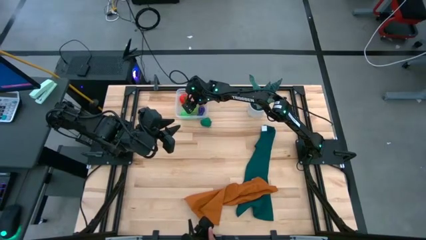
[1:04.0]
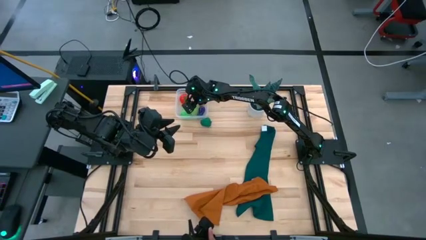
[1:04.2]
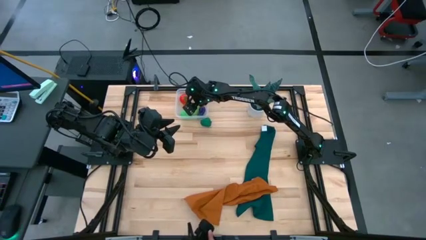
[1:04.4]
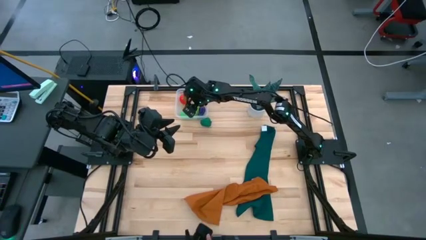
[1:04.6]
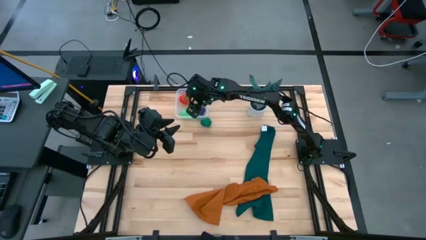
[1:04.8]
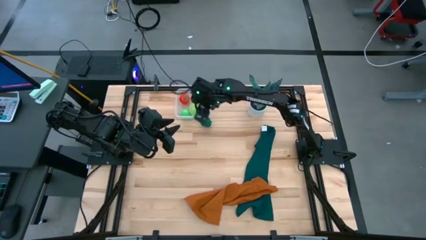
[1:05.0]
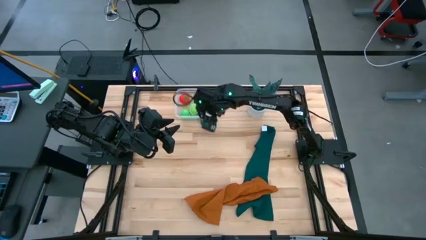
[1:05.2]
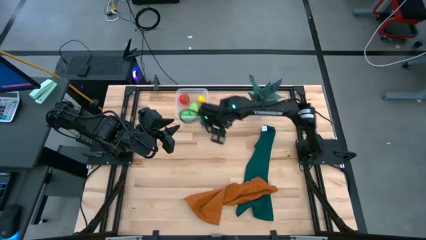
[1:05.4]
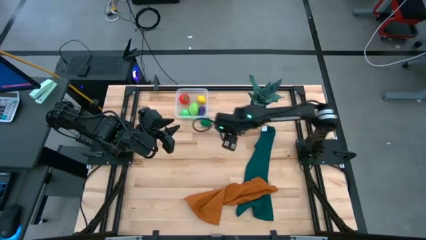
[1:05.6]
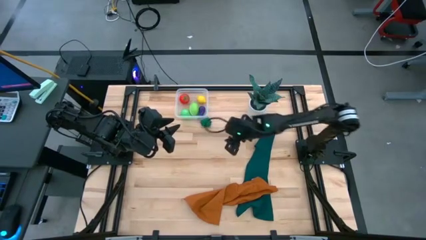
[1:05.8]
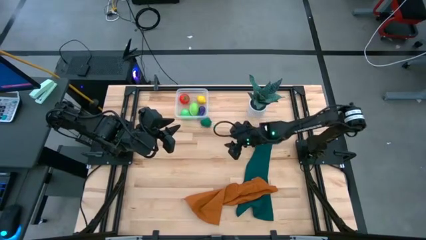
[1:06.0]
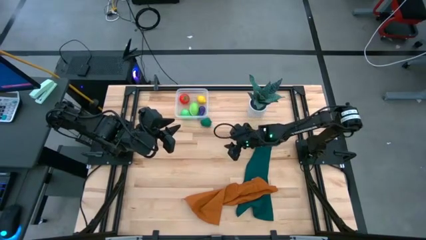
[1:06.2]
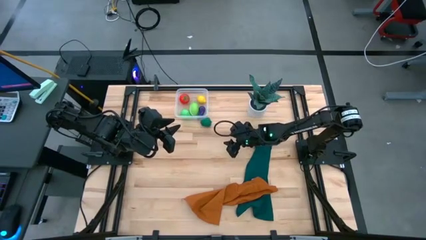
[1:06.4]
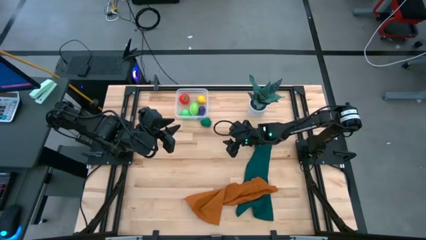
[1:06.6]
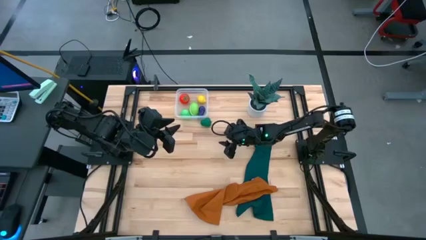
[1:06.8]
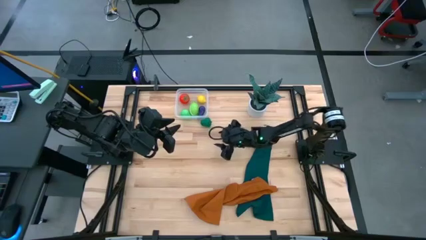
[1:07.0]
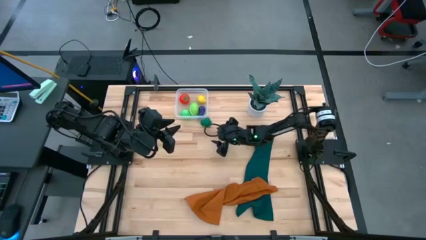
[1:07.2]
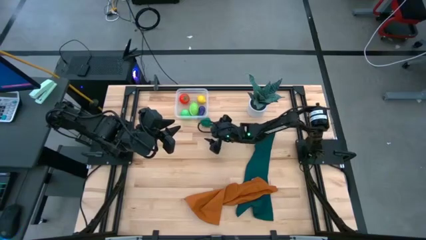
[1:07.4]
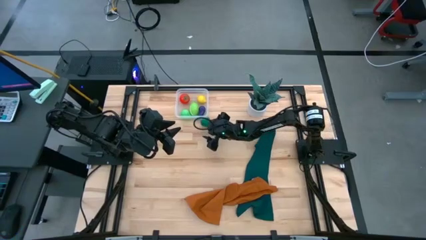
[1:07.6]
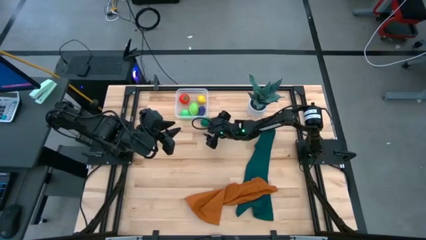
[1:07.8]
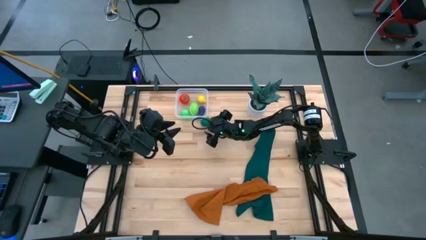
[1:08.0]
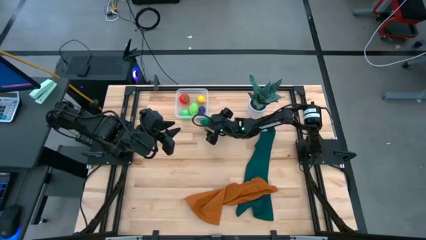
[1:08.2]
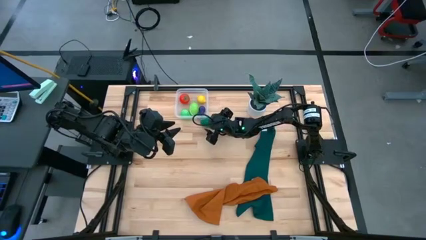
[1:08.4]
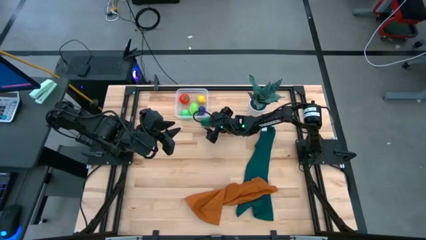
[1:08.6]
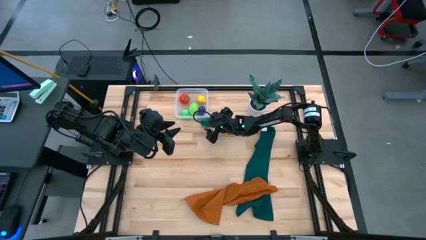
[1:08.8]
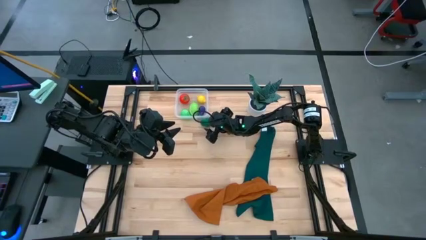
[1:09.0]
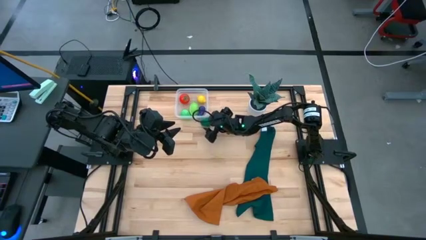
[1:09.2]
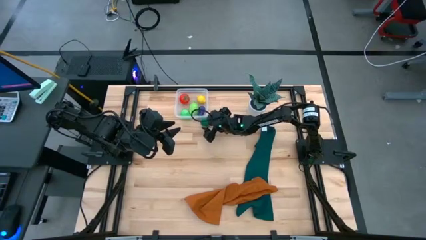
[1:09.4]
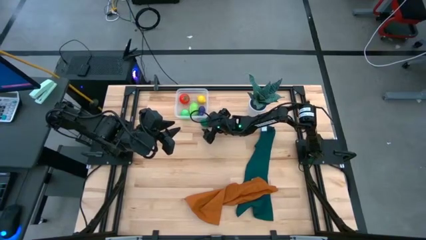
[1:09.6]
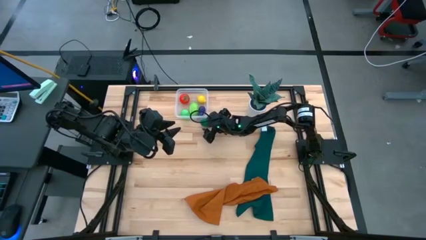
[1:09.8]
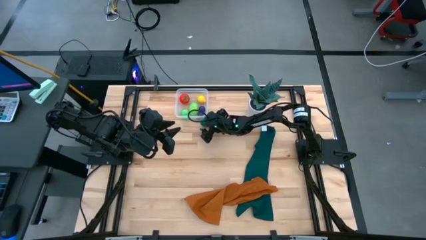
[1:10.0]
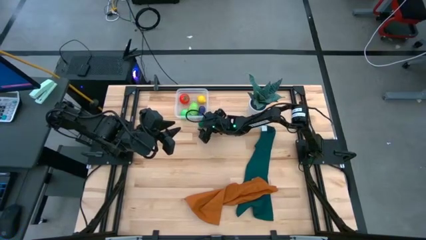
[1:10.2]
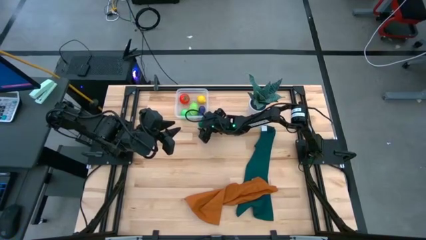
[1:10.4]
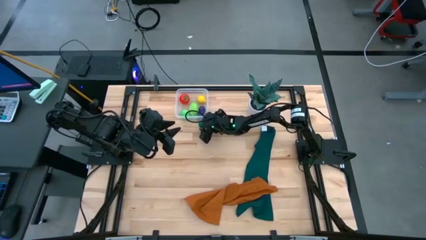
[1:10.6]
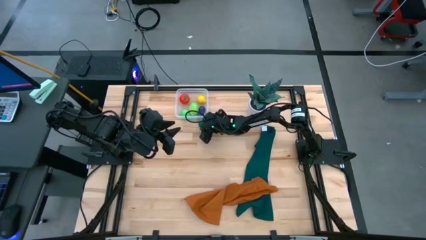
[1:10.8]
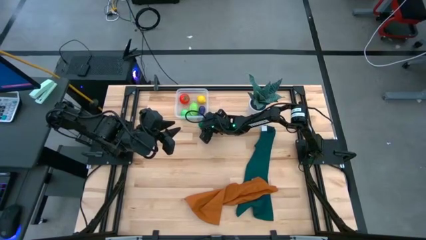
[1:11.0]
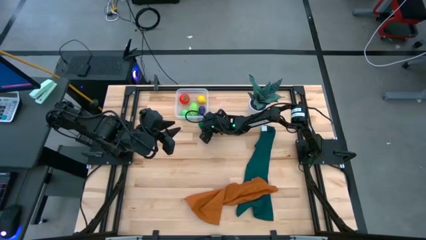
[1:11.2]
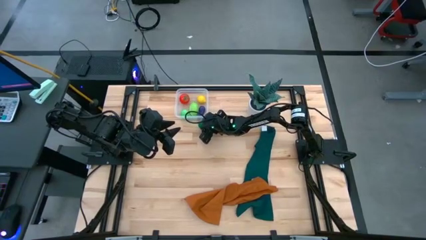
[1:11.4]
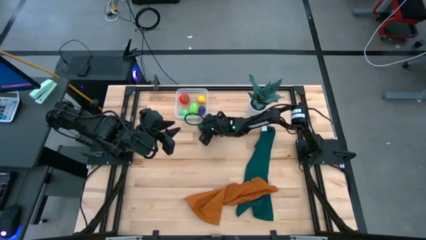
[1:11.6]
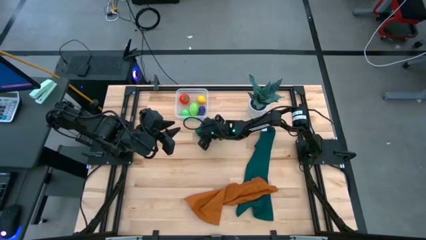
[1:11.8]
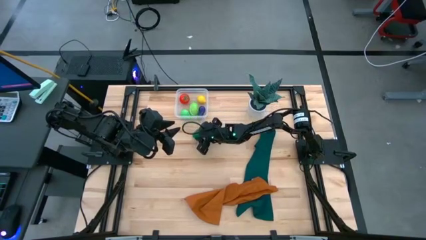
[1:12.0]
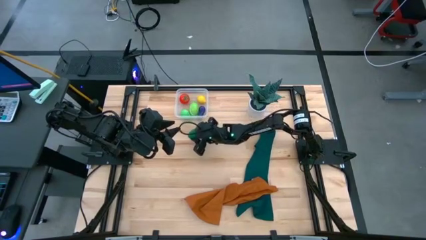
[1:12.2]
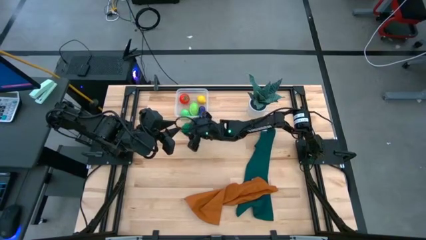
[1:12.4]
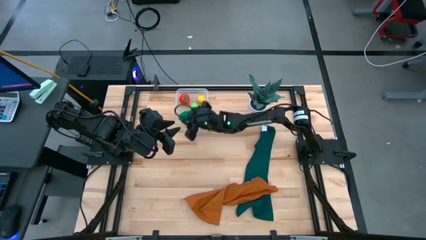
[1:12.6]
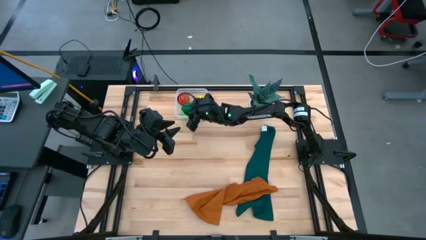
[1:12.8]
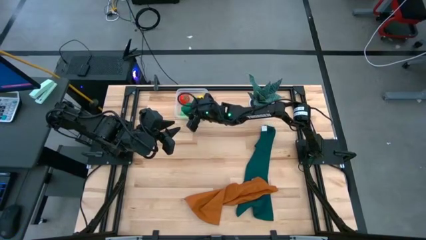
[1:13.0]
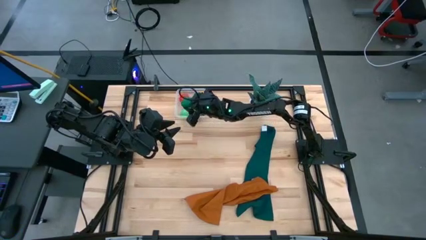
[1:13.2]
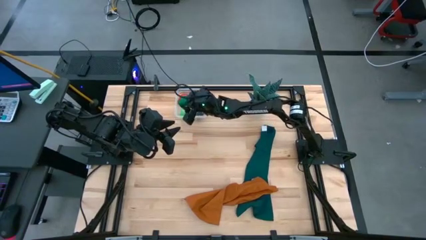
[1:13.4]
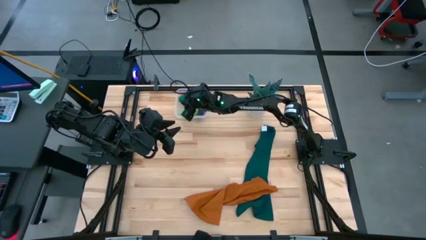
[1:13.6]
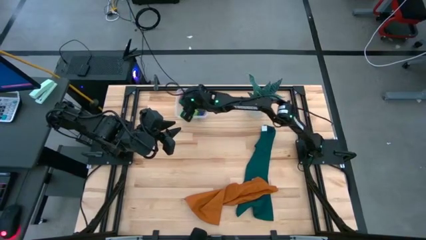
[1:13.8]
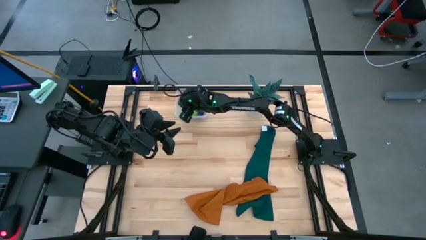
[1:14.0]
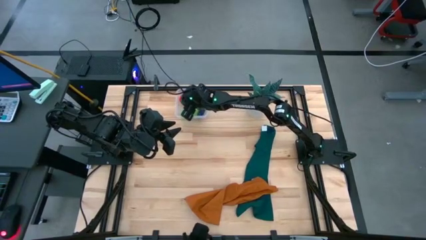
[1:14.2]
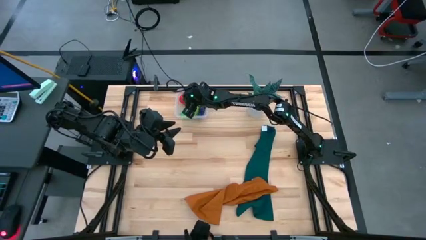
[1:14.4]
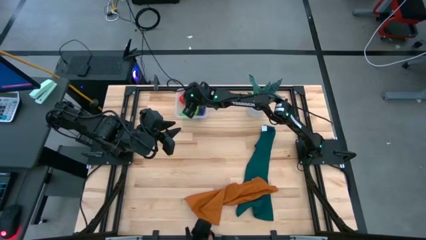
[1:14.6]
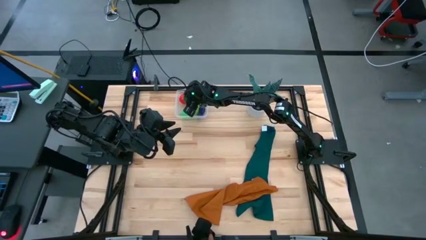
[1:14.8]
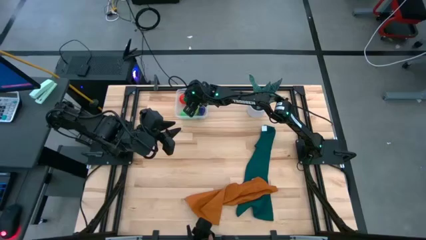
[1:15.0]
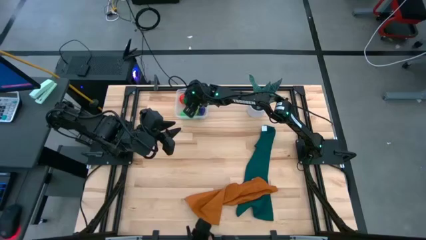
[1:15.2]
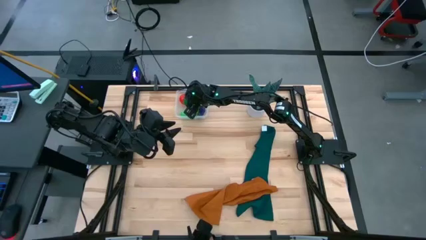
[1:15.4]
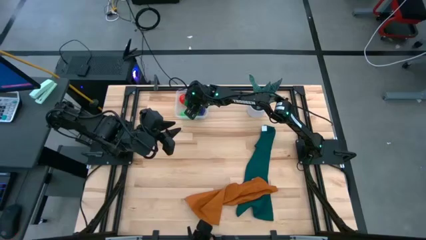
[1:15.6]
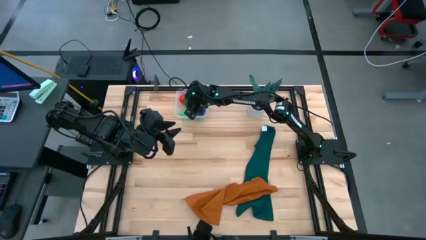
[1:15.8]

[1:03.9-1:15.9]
Task: Pick and placing Produce into tupperware
Put the green bell pepper into the transparent bin

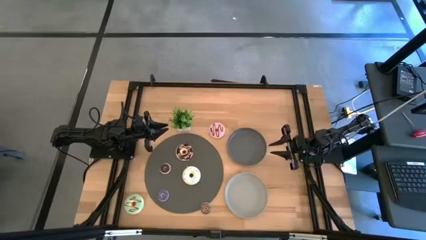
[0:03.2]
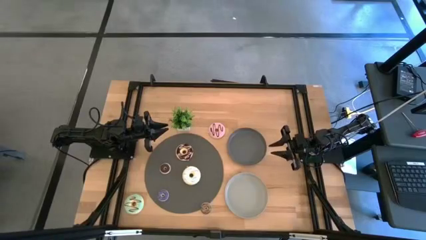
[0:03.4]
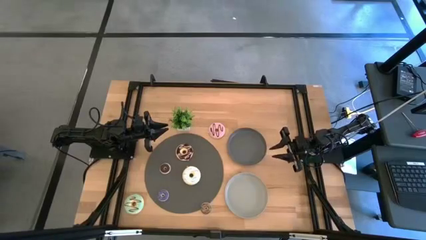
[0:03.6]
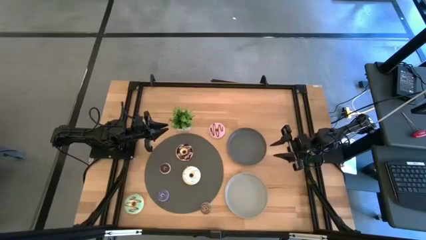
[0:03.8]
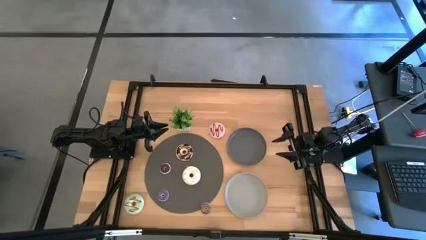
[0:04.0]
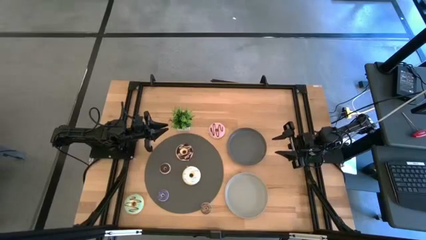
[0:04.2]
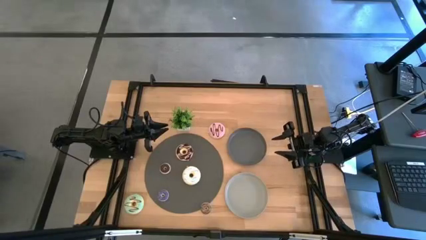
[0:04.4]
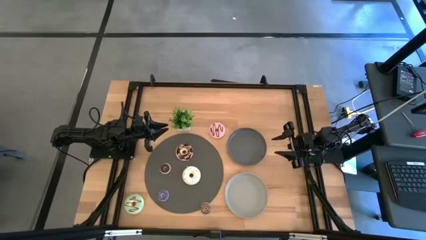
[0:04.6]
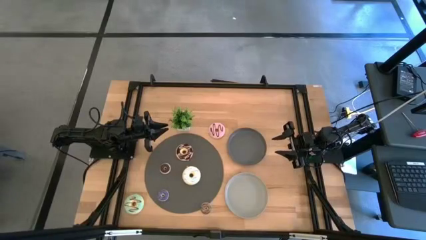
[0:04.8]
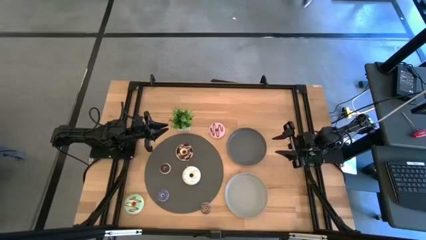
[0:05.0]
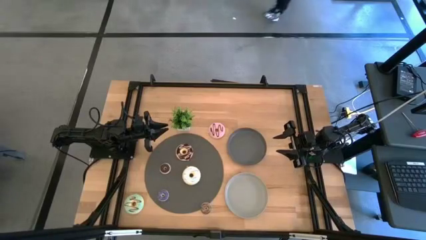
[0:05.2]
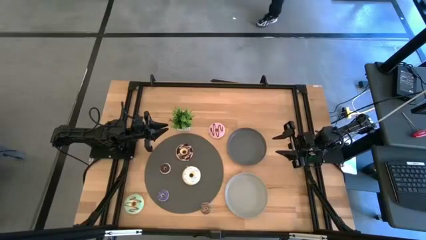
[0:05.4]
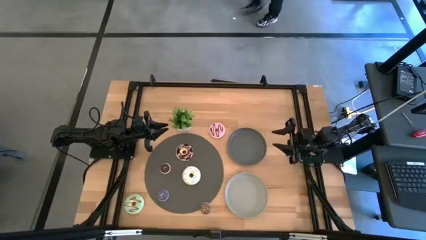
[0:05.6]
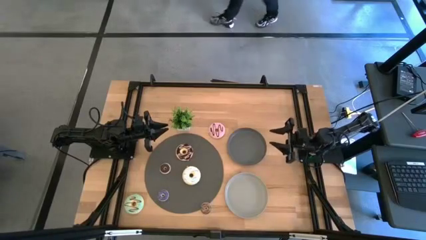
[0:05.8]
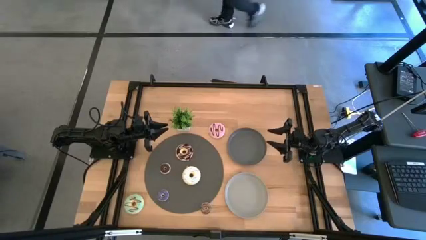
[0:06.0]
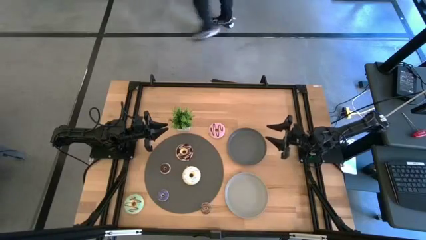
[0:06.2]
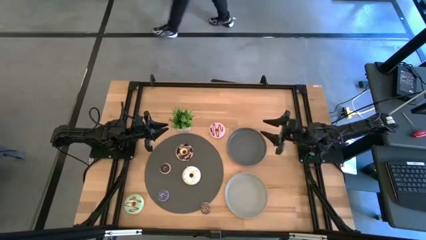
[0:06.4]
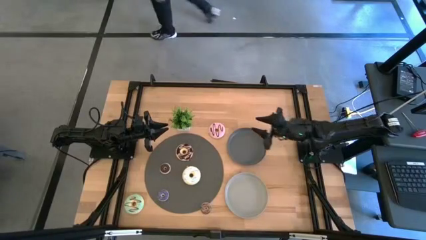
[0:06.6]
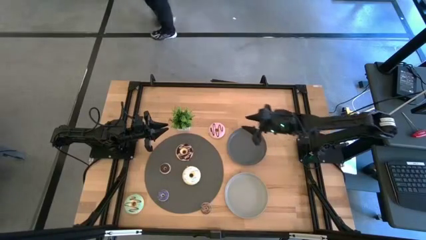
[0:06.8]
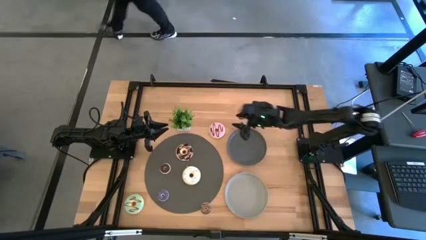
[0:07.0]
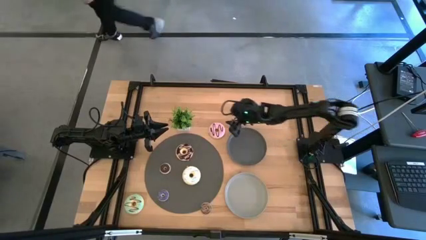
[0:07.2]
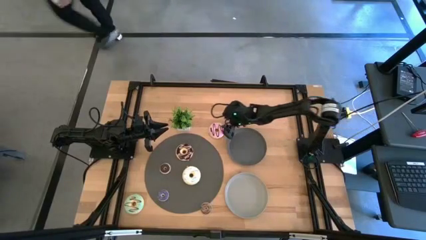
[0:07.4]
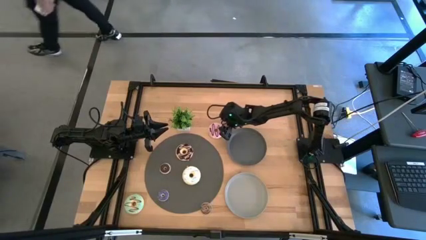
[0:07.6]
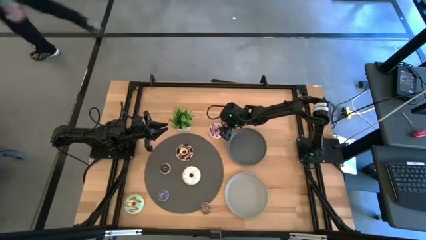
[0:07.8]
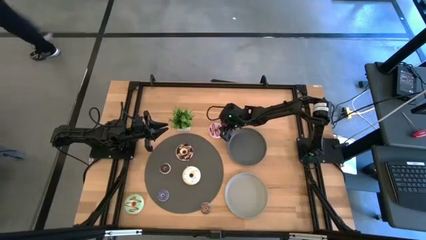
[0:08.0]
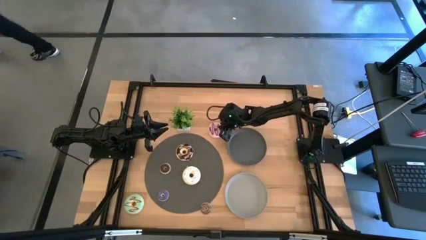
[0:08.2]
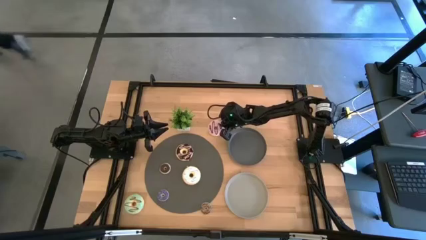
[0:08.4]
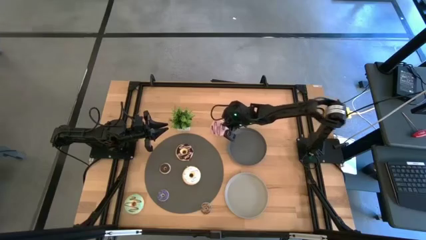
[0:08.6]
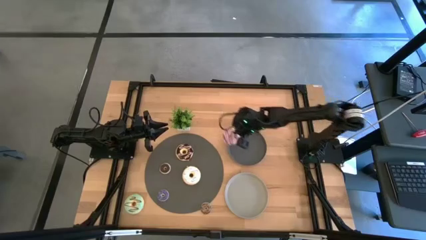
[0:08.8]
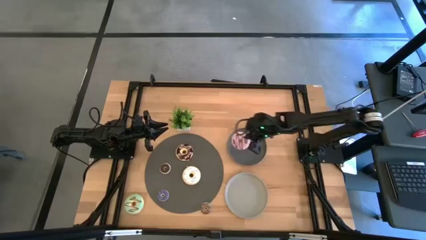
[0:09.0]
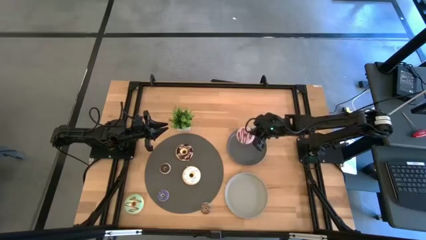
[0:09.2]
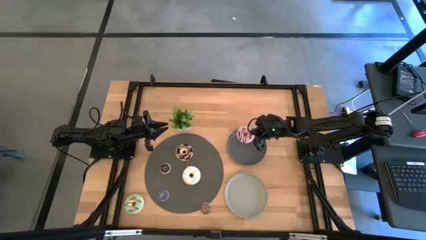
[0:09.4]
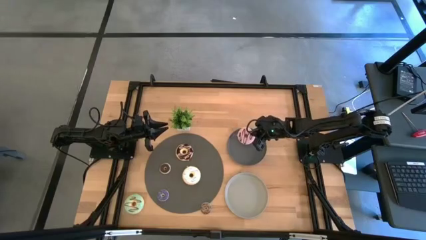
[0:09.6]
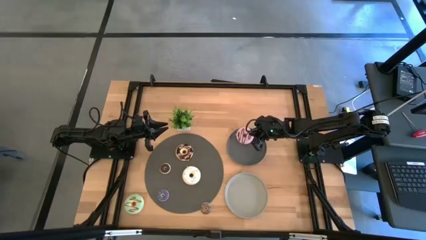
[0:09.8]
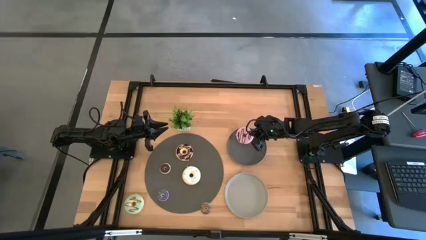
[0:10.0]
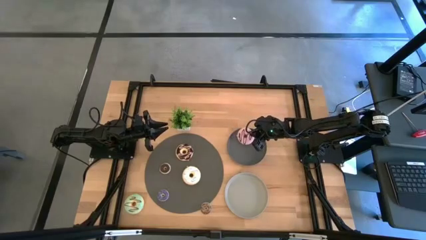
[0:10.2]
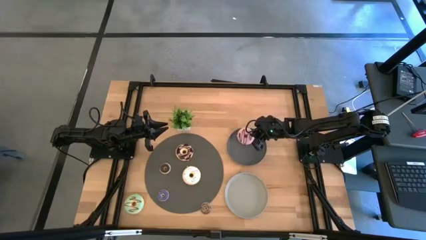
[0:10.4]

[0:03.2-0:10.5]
Task: Pick & Place donuts
Put the large purple donut on the black plate
